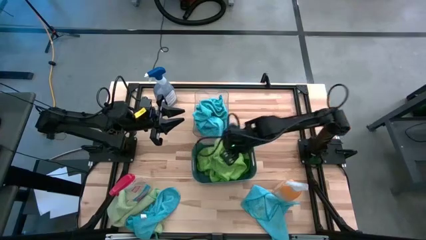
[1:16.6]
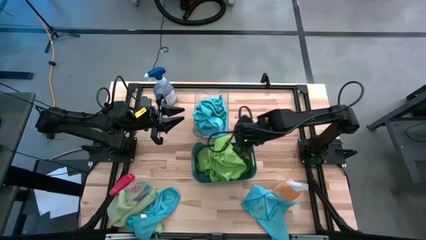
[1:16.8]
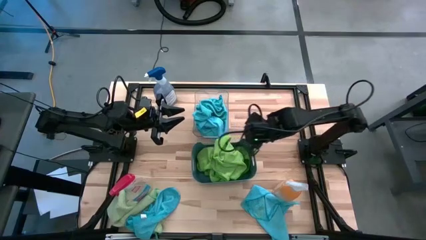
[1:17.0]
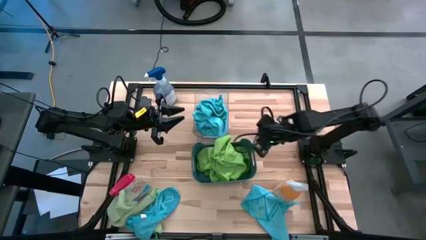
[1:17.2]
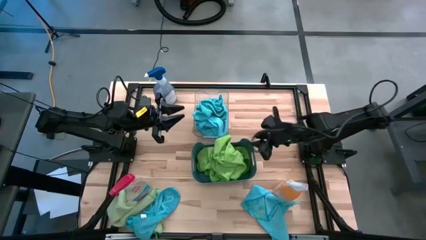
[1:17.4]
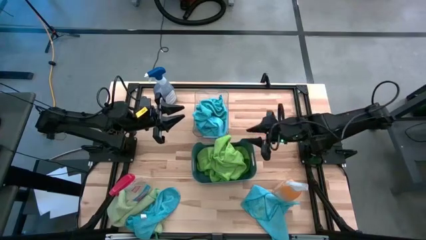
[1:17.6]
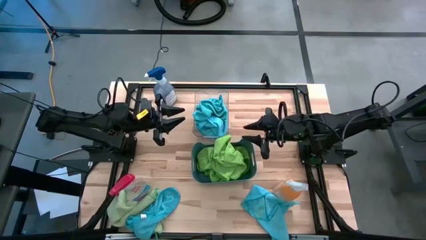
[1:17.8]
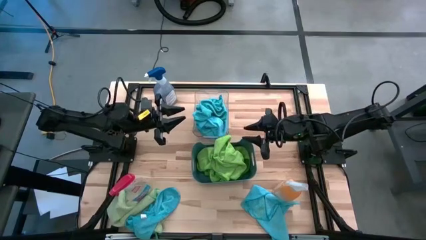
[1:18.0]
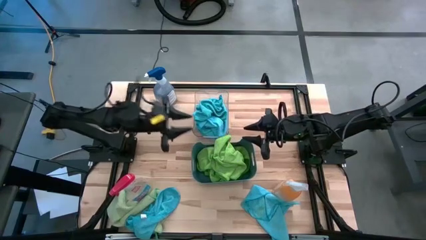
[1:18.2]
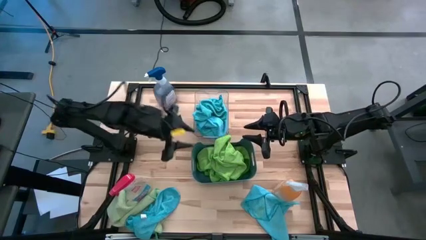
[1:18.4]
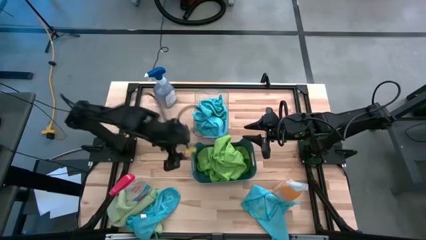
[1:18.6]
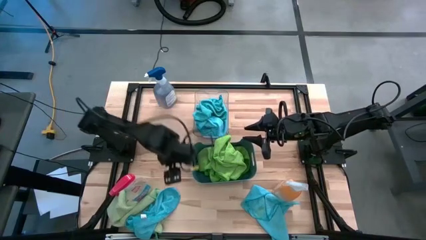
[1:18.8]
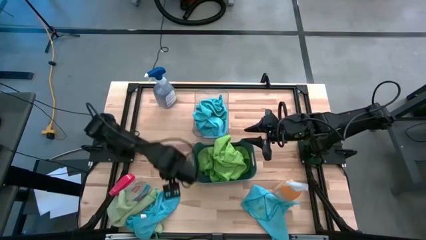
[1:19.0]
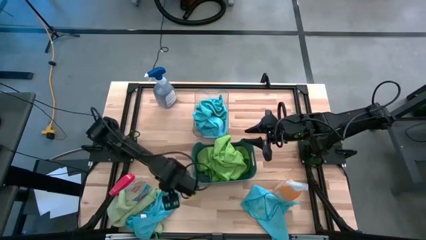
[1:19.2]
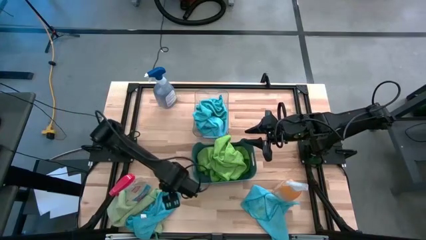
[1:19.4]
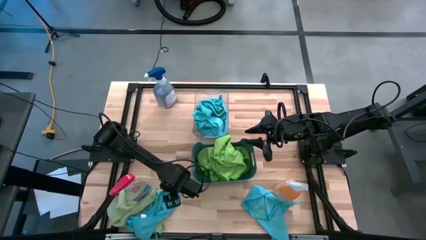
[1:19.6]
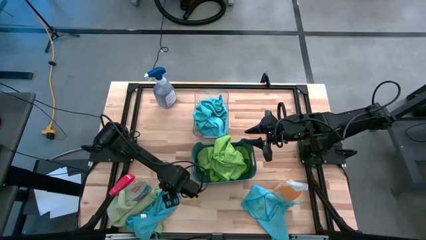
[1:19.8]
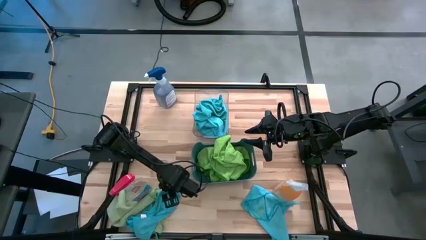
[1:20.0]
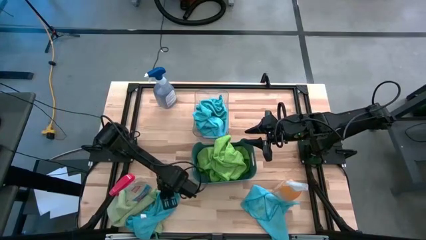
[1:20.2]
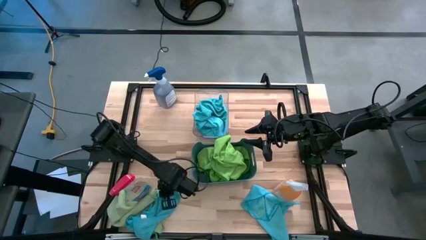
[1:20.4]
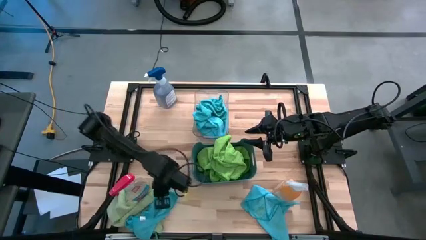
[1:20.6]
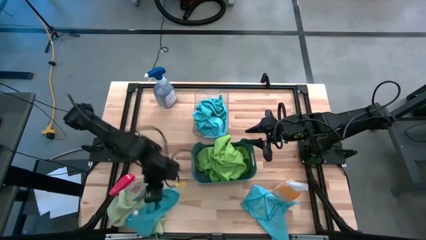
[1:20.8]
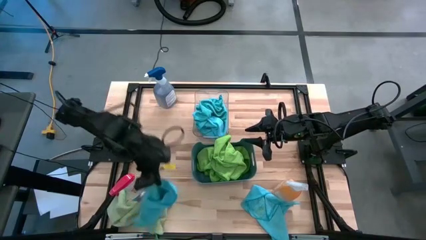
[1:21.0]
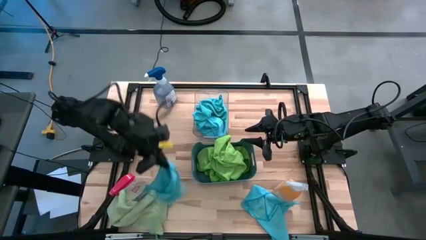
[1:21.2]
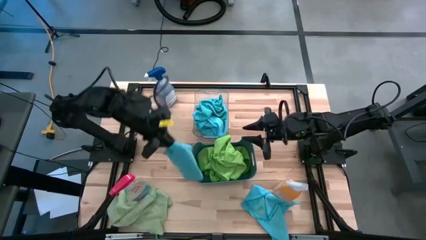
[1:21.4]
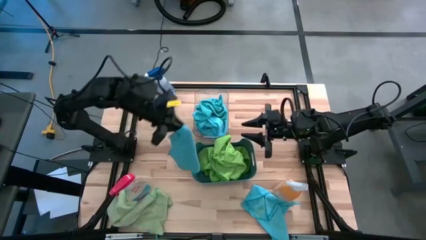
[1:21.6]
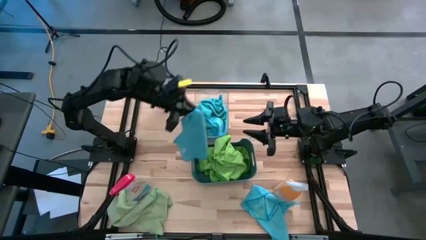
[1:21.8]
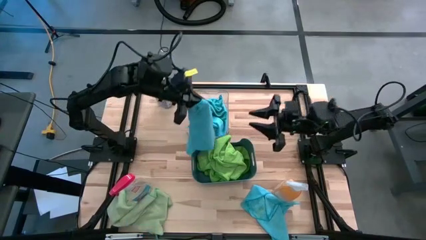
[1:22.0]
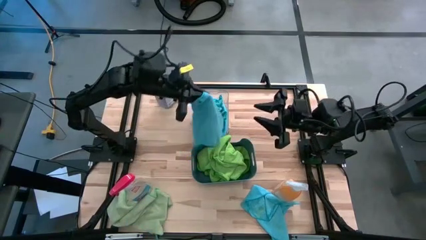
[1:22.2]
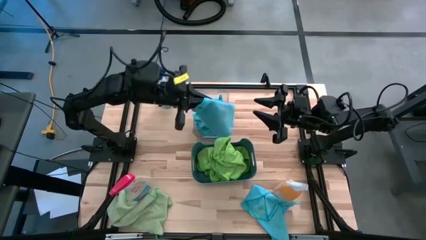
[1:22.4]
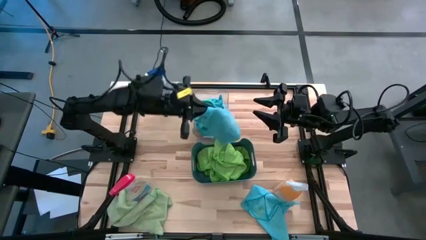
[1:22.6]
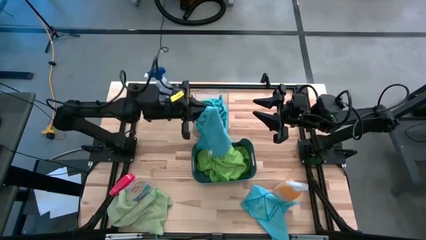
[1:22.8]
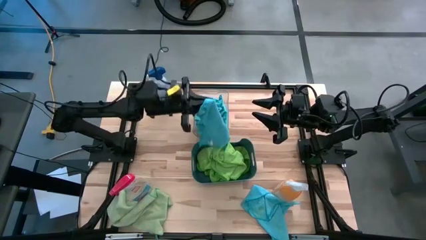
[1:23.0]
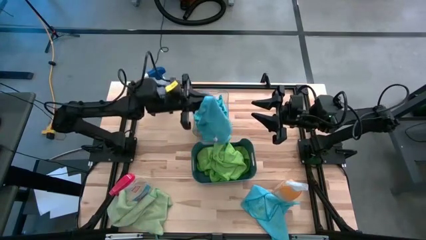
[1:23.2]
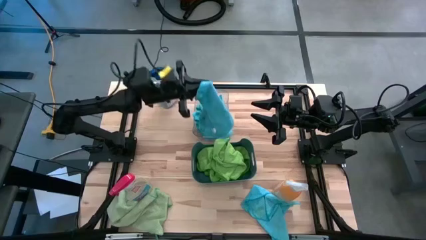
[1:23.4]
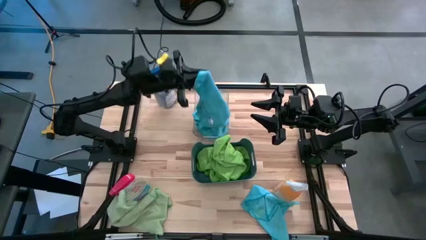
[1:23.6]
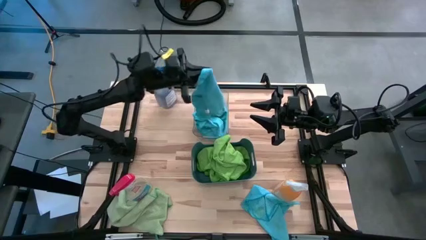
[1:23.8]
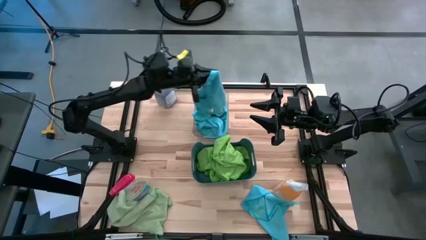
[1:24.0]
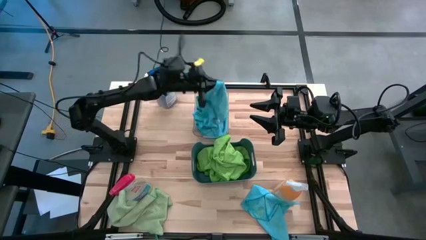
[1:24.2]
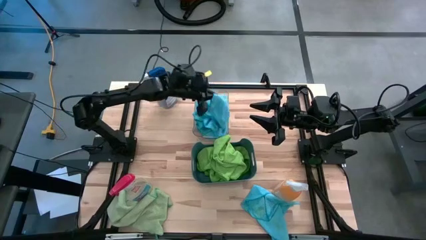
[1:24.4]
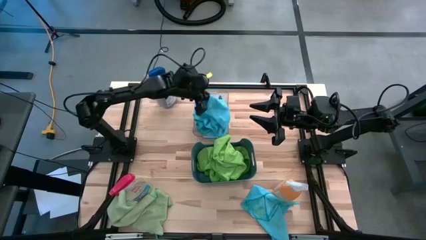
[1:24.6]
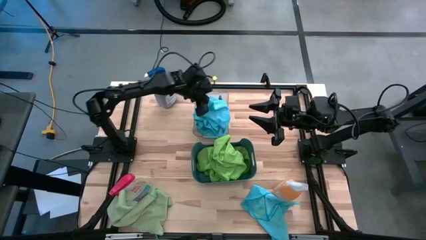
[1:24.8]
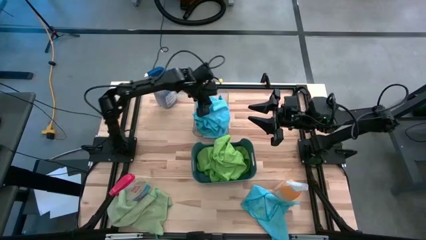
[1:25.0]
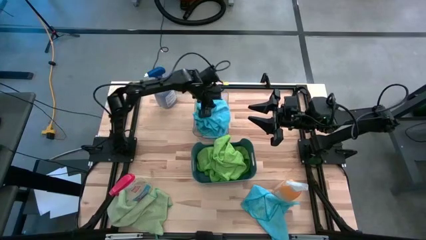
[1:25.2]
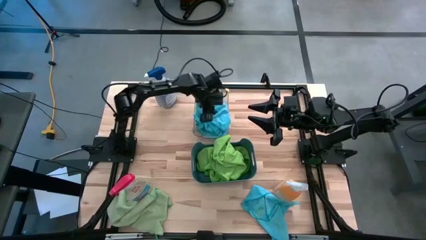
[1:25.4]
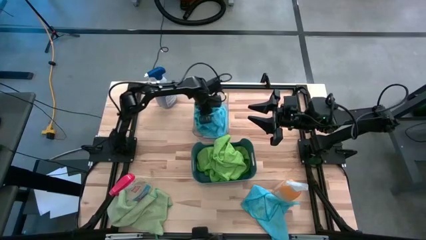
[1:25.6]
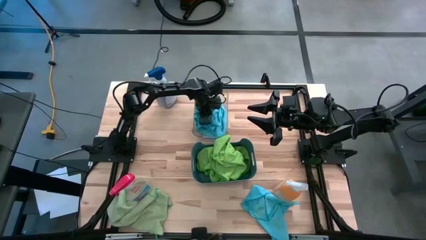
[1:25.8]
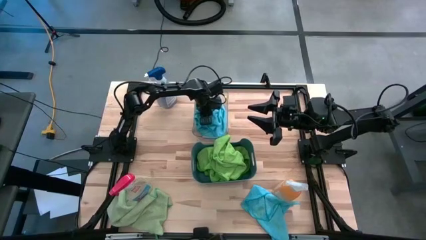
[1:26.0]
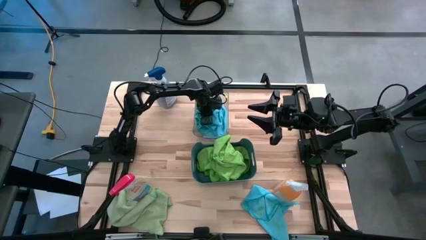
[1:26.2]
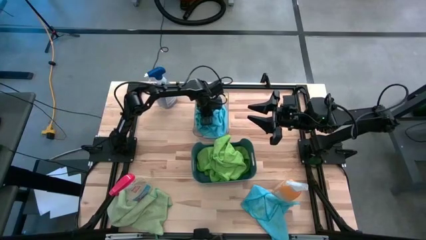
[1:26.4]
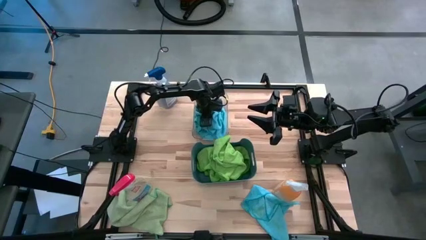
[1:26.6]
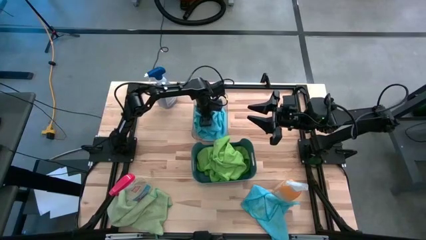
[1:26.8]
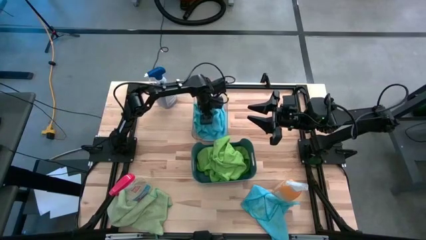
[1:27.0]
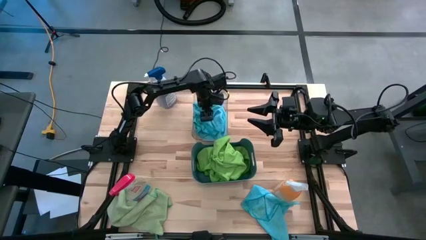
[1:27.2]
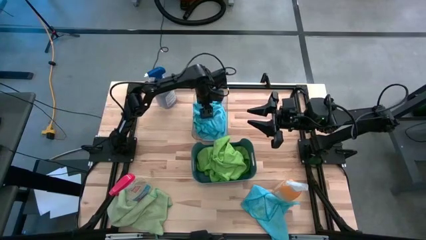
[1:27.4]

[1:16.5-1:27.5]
Task: Sort microfiber towel by color & place in baskets
Put the blue microfiber towel into the transparent bin

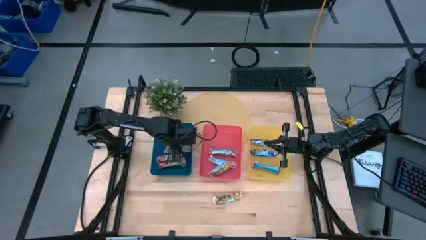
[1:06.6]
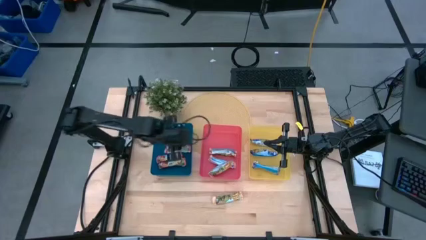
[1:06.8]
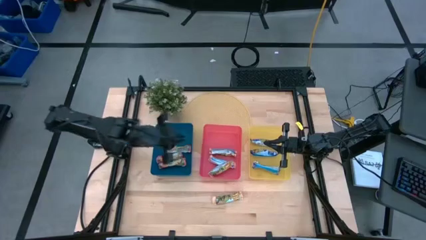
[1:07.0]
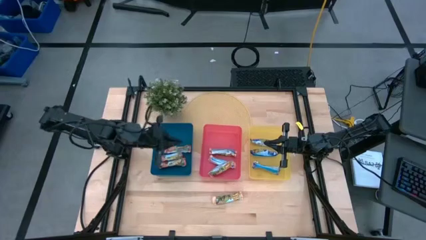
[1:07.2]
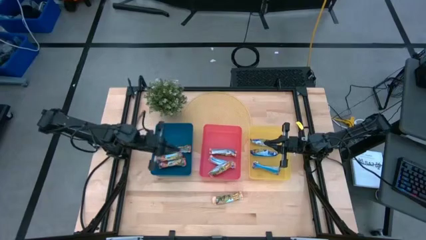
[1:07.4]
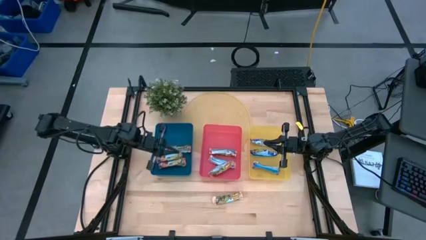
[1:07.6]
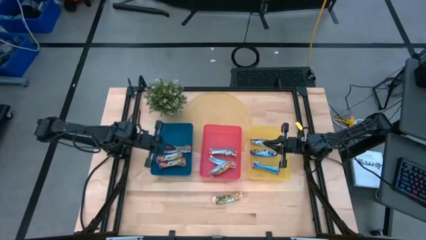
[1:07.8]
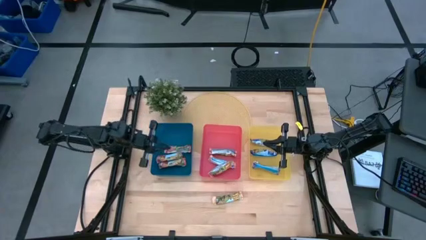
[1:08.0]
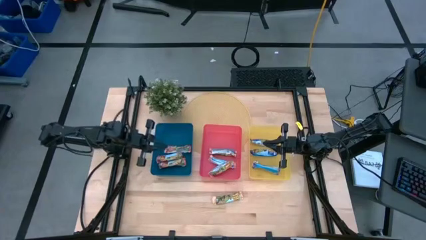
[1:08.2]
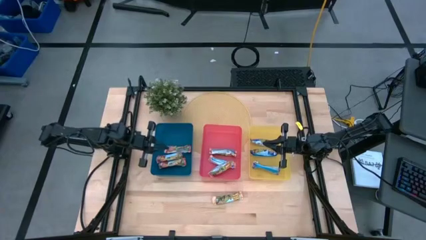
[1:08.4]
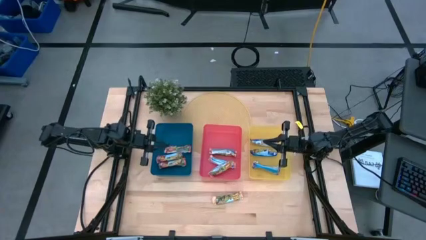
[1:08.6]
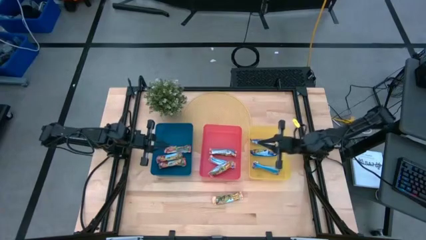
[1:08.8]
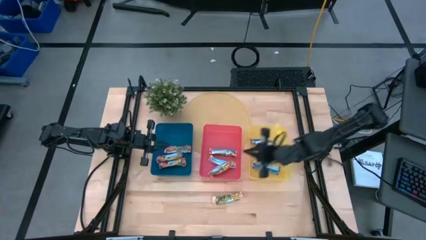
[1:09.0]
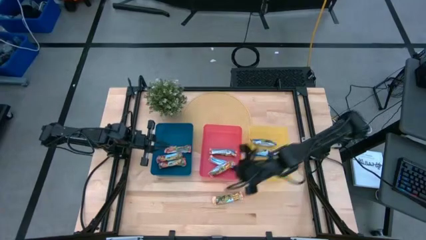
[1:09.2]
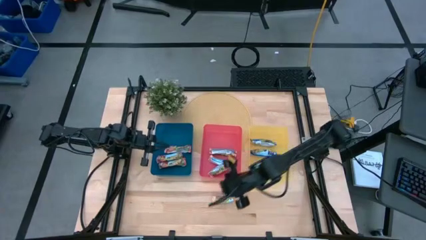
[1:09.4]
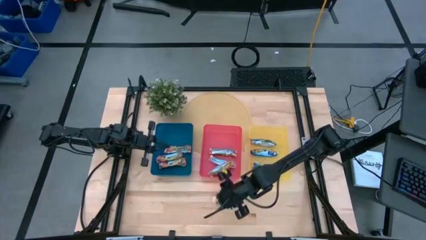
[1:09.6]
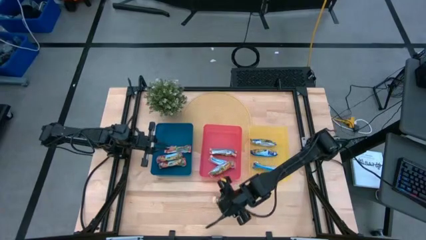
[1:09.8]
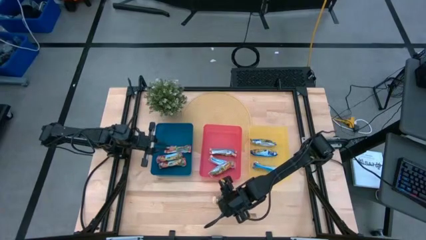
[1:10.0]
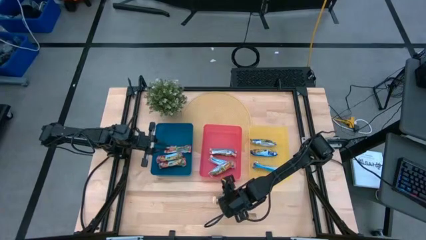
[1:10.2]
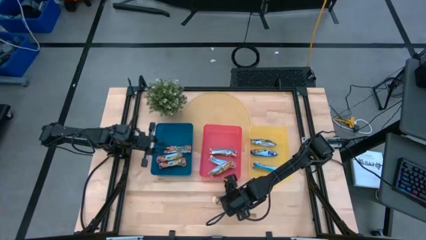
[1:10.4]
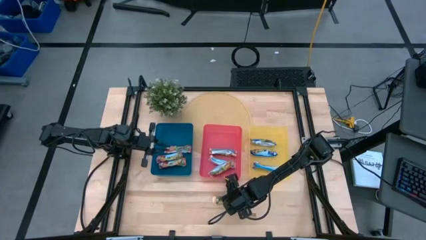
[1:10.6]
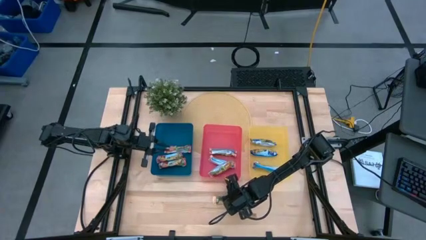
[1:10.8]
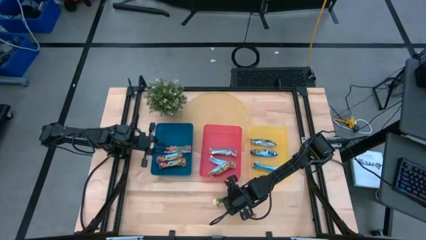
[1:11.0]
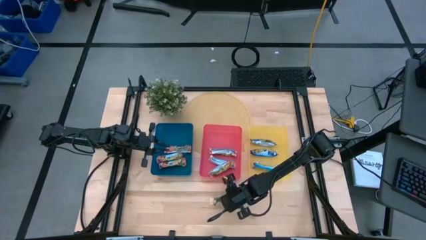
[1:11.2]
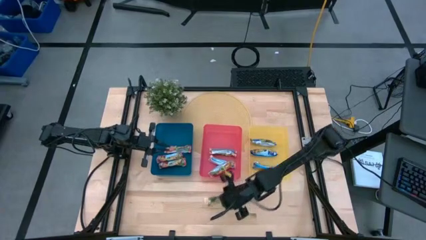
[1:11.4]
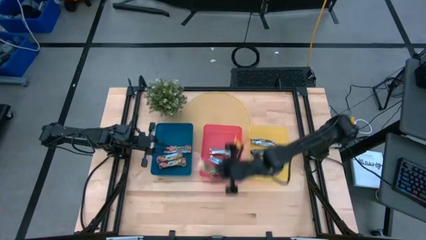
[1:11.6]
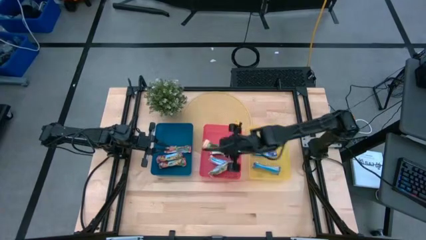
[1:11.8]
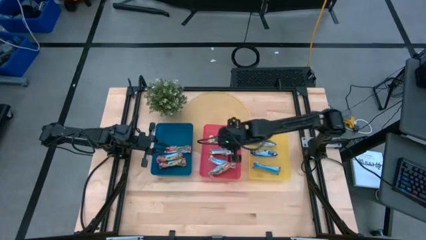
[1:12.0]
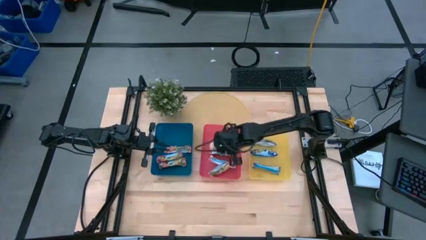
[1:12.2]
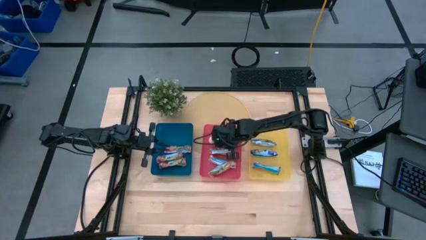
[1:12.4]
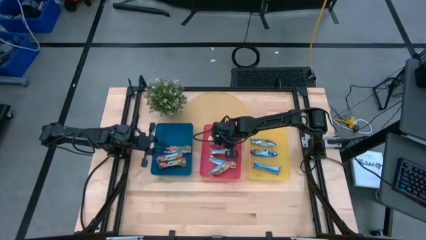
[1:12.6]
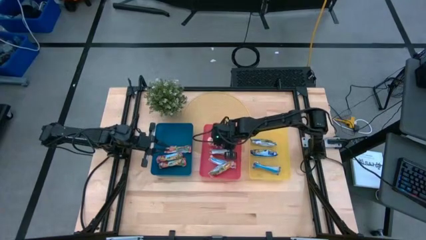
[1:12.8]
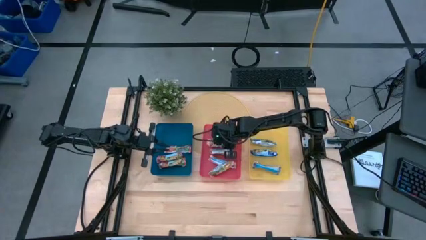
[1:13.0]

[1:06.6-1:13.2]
Task: Pick and place Granola Bars by type
Put the yellow granola bar into the red bin
